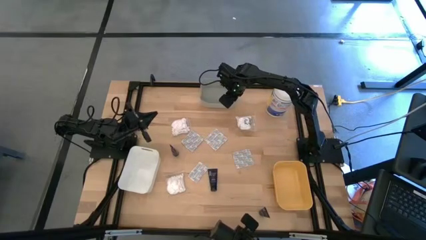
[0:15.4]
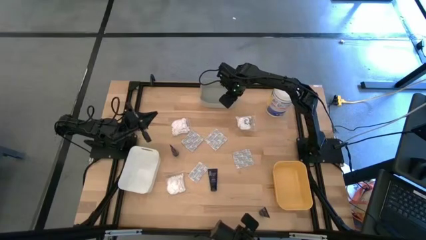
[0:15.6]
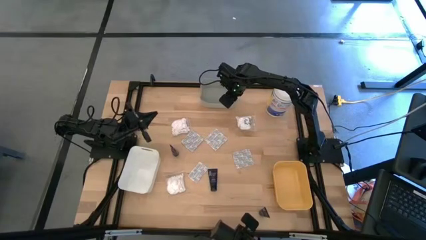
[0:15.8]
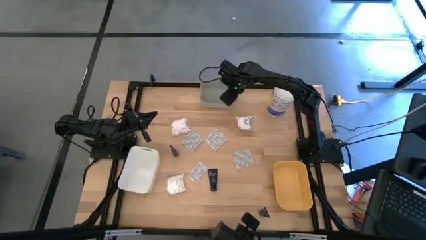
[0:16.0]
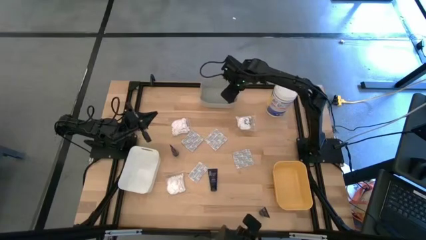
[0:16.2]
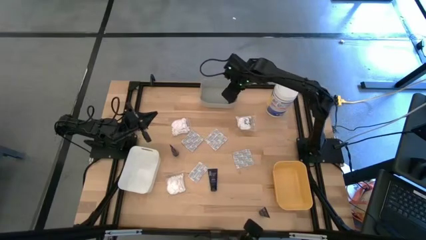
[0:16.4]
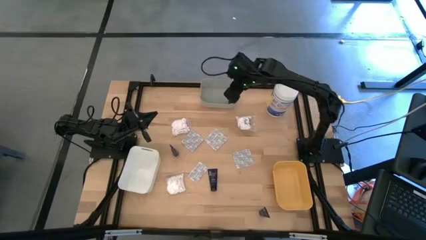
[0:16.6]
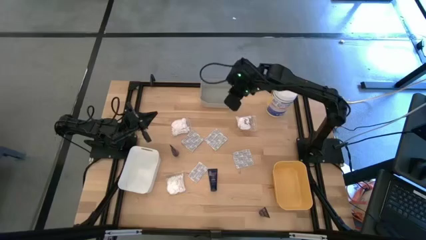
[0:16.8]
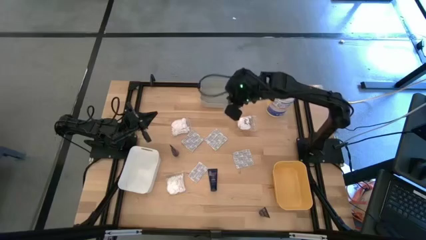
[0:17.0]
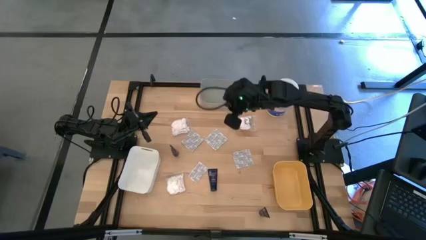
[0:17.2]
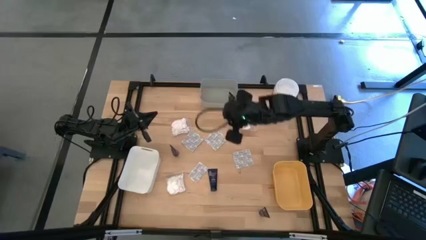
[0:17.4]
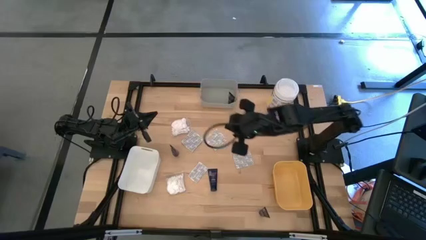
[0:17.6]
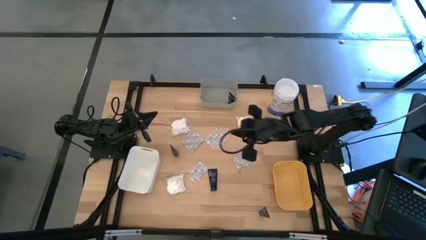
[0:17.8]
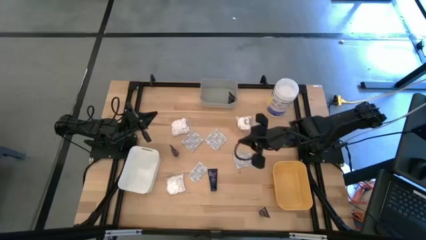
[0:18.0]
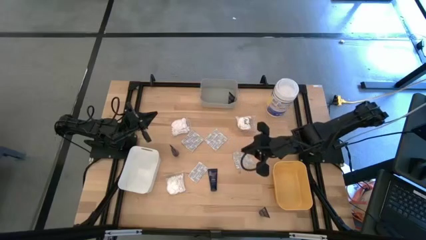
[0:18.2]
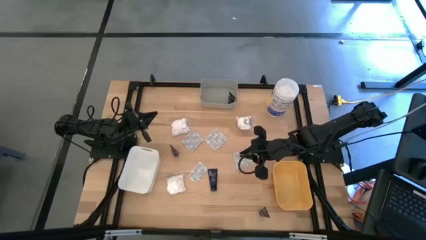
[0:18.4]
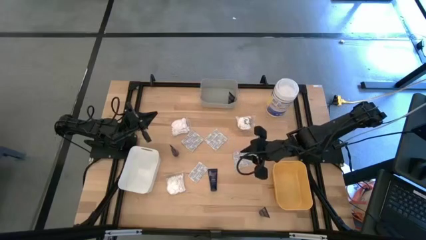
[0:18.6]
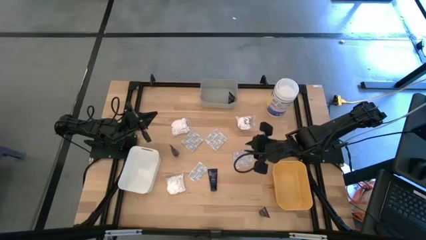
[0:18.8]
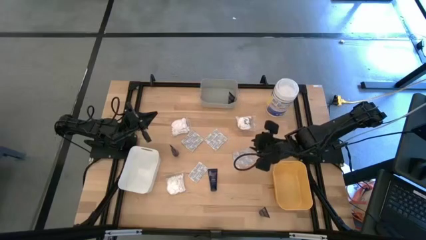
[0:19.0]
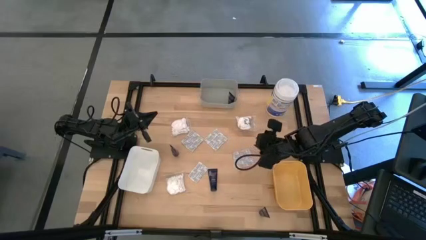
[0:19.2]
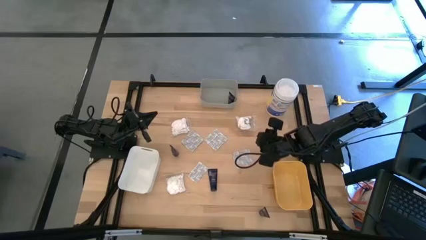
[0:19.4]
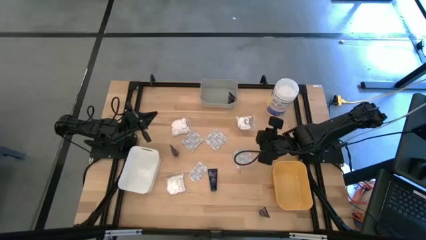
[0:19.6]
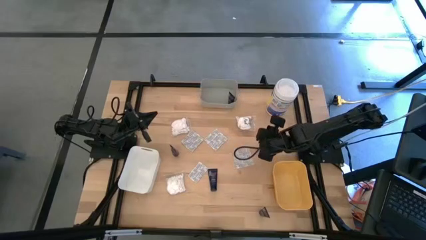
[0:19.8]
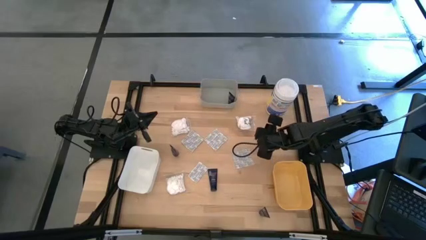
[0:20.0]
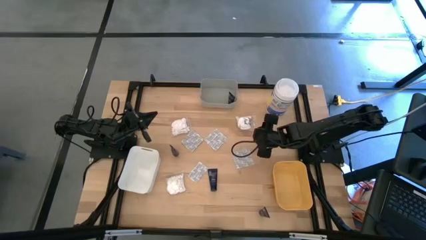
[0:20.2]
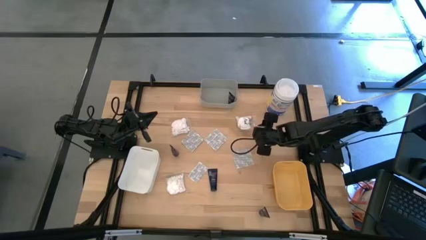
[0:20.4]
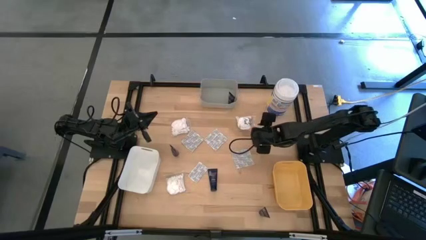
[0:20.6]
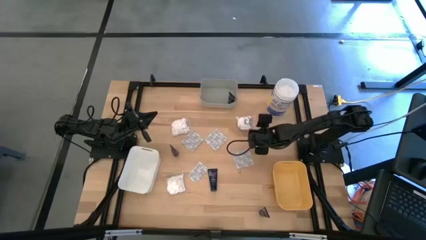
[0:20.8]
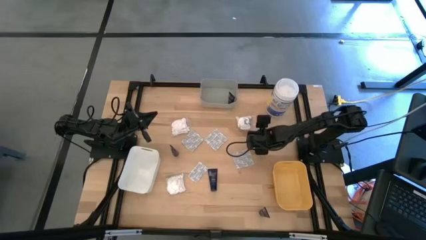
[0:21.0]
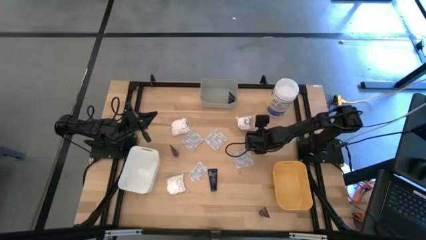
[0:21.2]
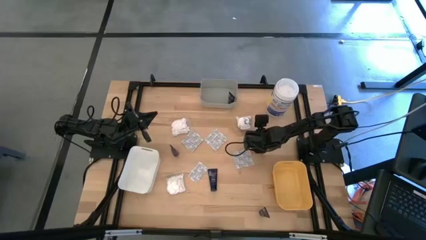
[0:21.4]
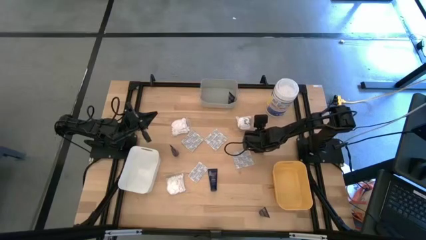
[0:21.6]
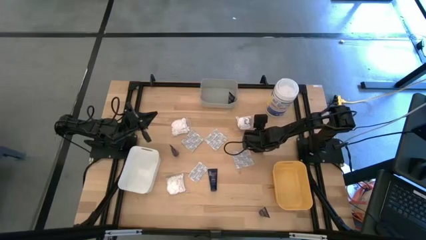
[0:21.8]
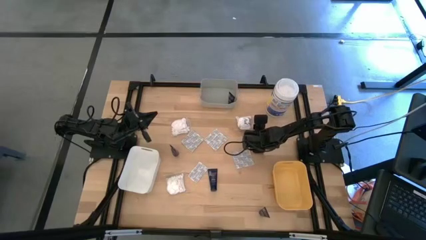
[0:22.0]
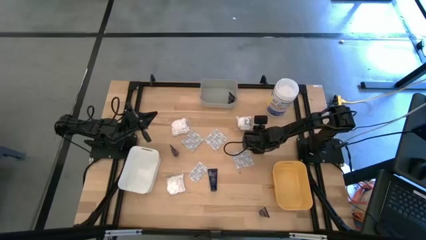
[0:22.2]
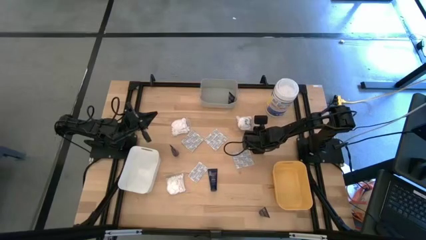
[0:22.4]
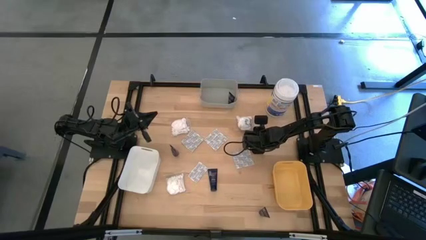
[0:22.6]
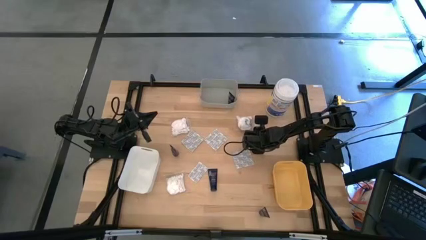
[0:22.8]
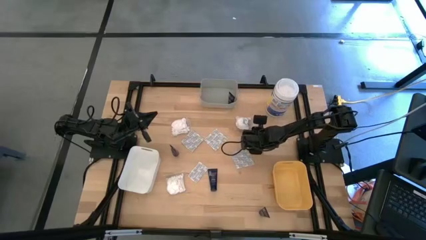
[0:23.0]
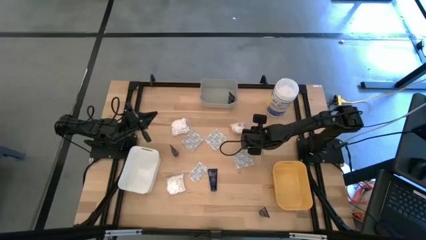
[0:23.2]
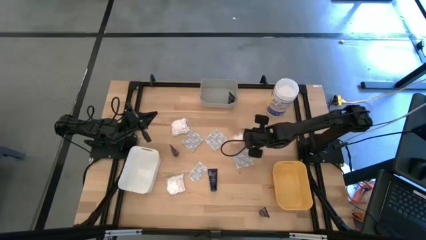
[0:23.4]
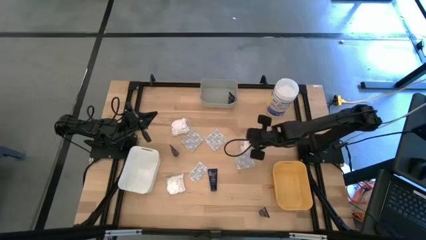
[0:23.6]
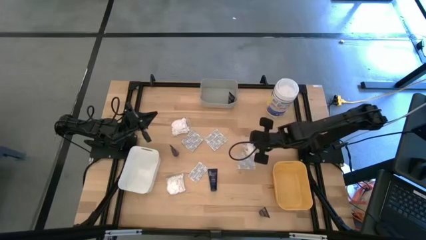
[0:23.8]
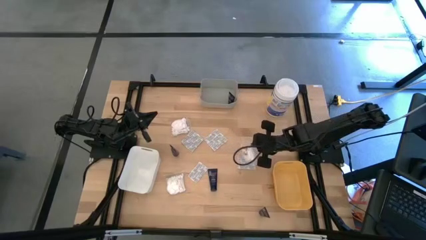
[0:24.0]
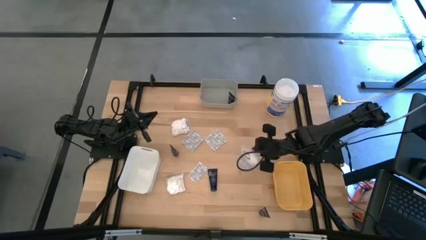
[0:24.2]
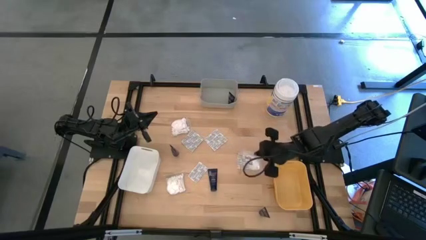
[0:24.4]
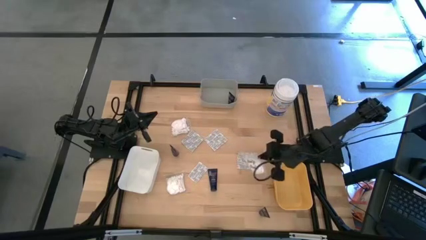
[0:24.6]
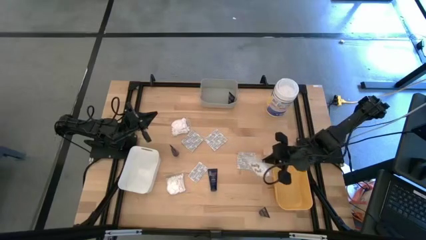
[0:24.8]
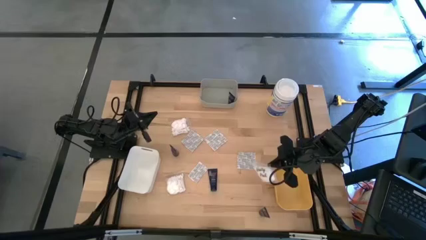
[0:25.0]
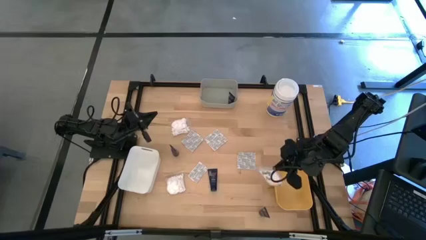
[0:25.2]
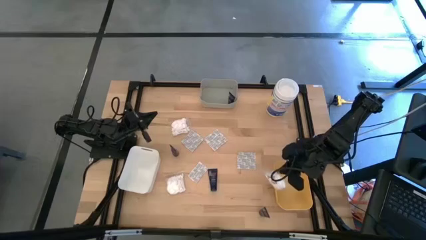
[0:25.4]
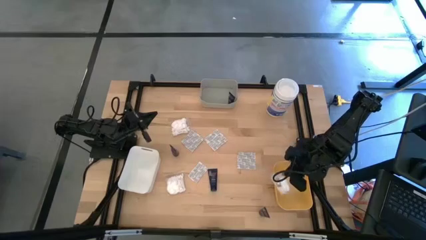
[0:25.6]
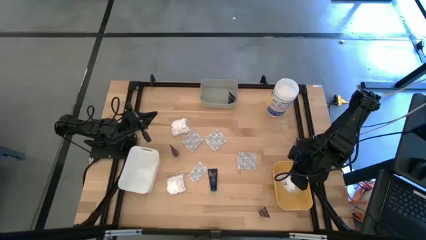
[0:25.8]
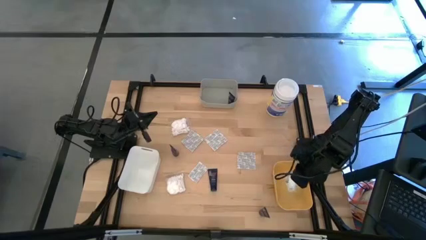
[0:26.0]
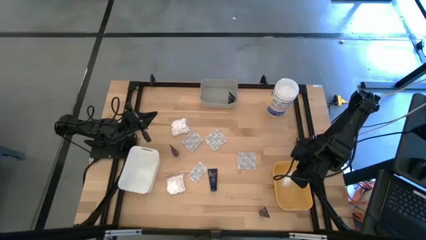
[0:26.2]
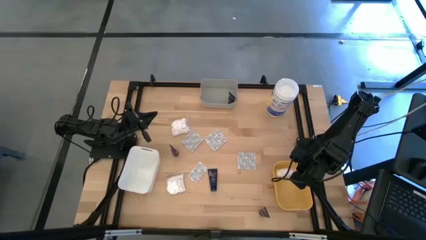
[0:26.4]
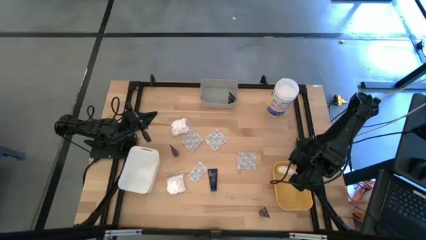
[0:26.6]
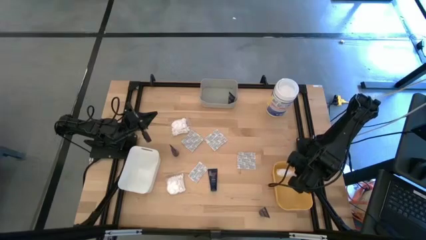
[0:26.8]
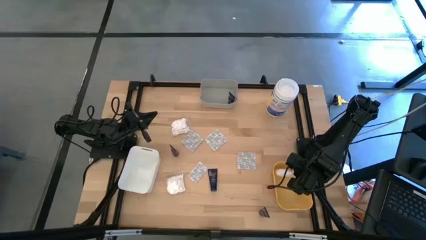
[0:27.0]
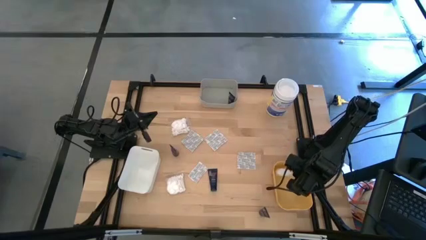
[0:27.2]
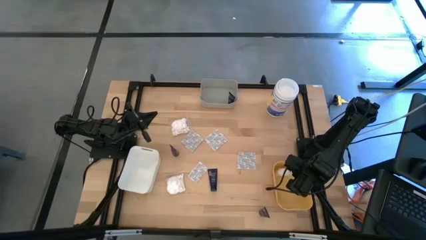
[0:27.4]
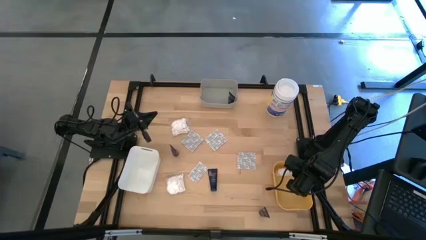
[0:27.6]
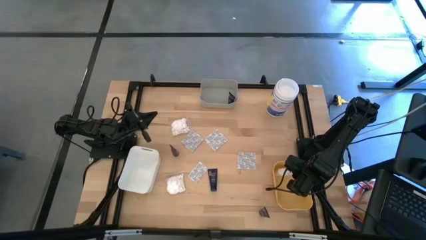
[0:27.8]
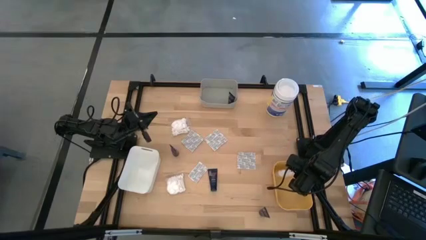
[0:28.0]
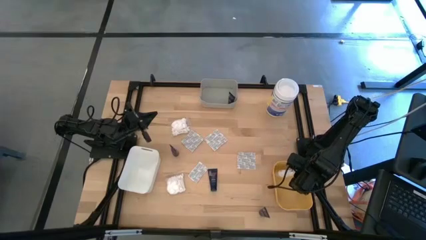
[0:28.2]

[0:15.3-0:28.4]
Task: Pick & Place Travel size toiletries
Put the right cotton pack into the yellow bin

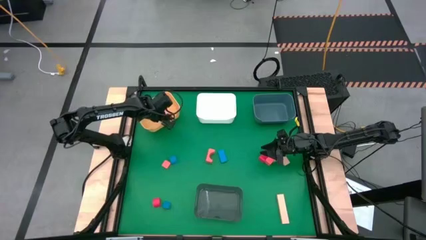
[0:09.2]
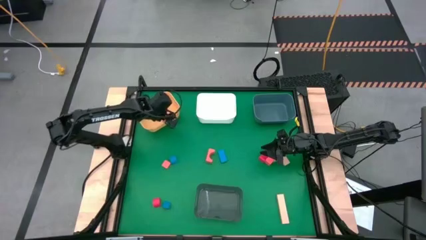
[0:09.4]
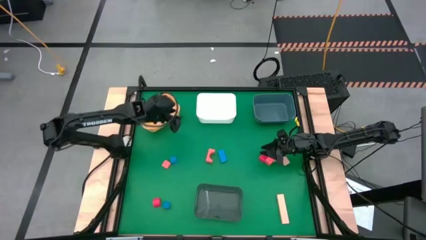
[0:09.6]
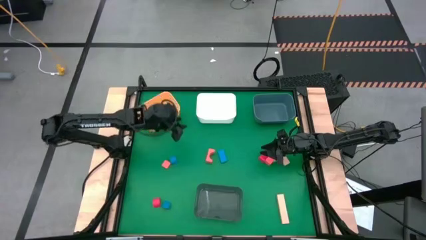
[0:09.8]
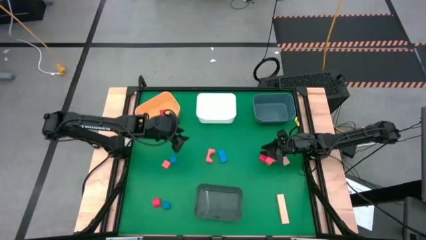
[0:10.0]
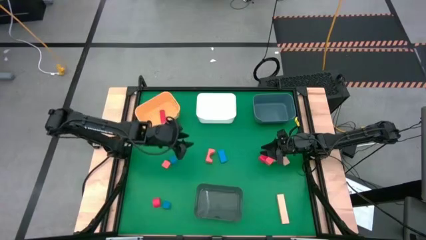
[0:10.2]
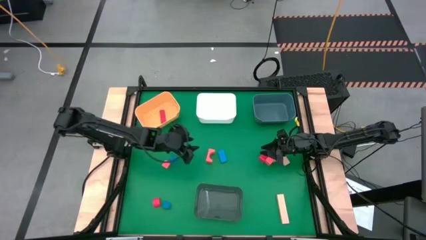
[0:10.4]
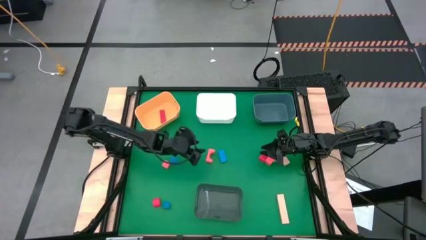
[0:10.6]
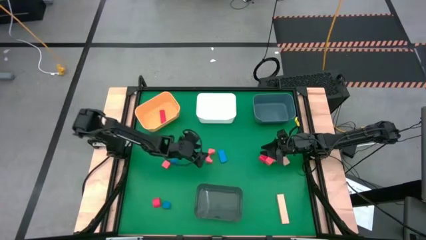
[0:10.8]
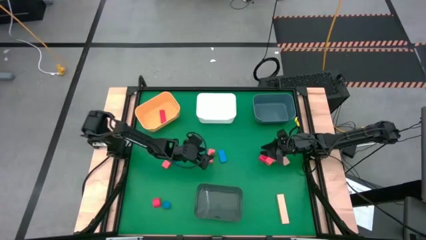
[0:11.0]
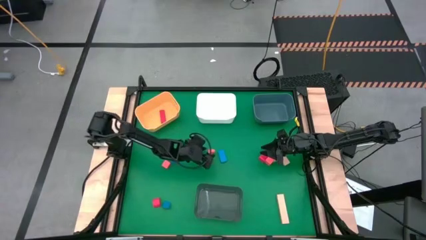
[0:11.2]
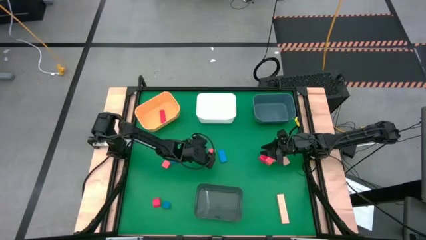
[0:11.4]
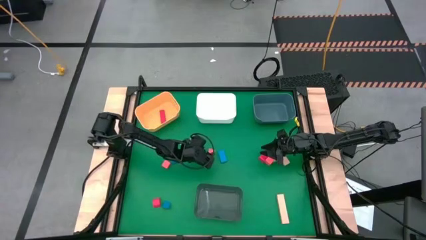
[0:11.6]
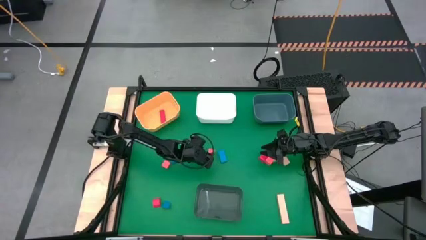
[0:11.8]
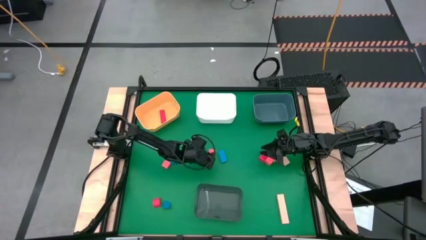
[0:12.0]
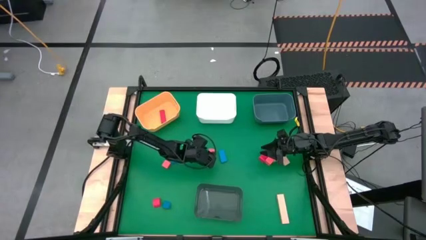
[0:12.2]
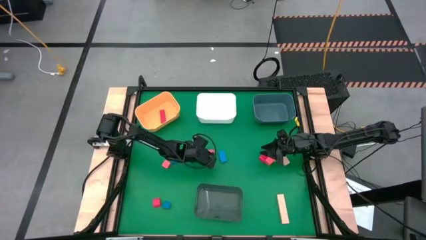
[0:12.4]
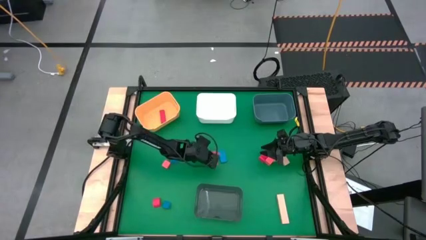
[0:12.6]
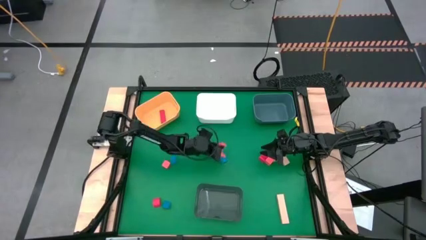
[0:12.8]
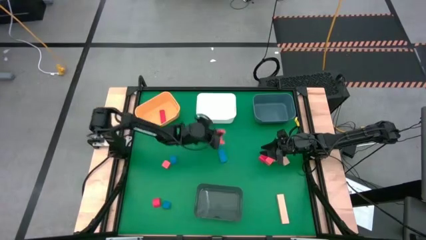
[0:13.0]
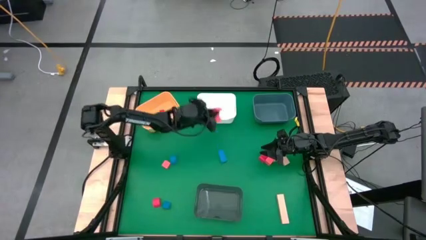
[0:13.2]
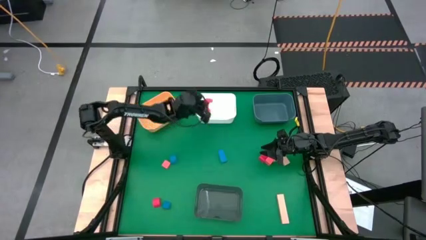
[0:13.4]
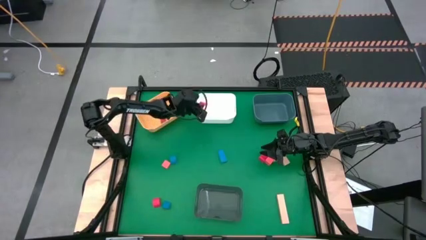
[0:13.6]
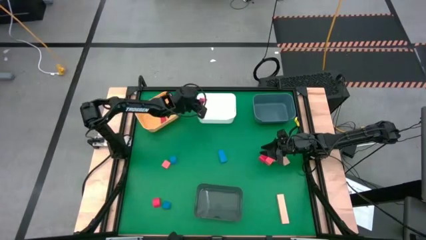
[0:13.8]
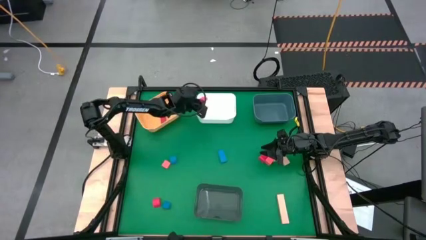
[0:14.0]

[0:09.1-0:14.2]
Task: Sort & place blocks by color
Put the orange block into the white bin
